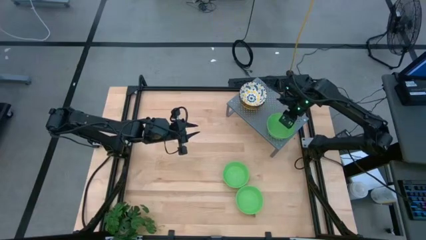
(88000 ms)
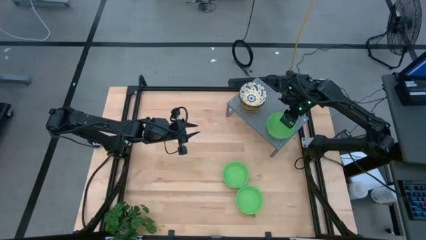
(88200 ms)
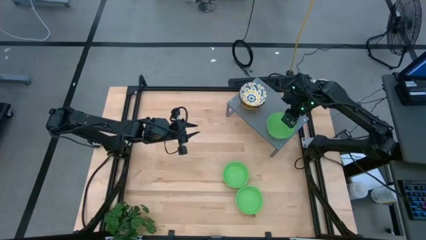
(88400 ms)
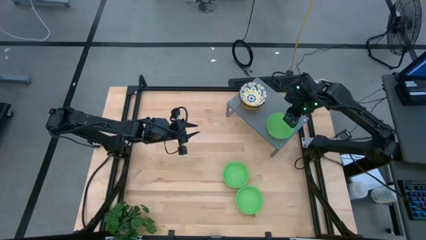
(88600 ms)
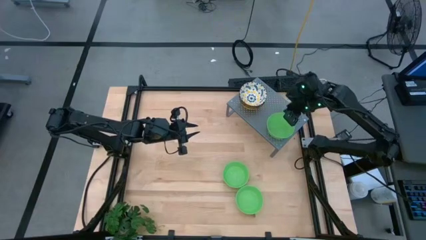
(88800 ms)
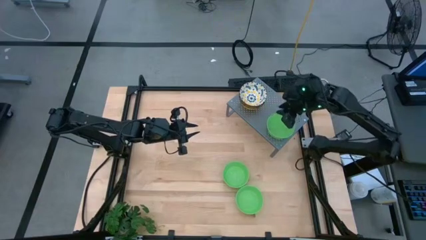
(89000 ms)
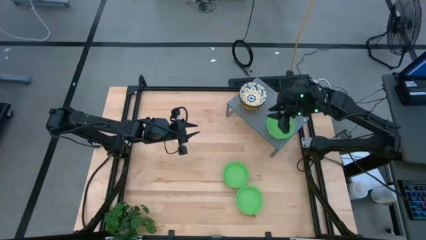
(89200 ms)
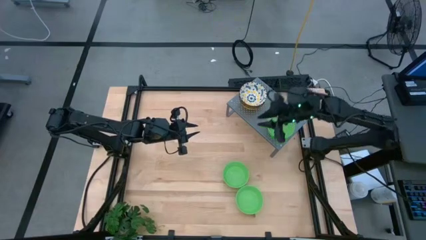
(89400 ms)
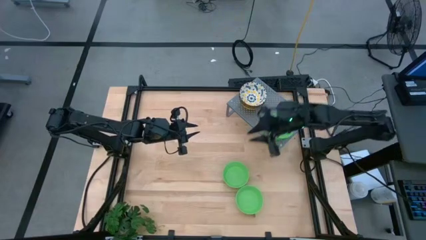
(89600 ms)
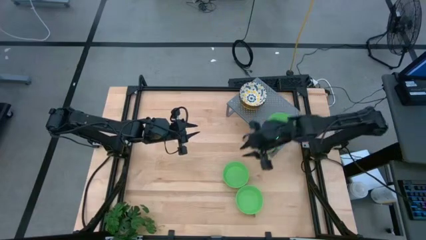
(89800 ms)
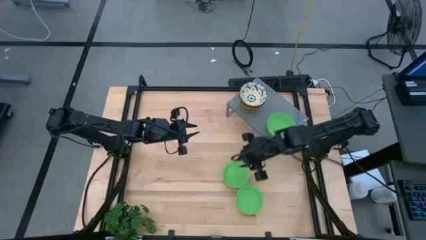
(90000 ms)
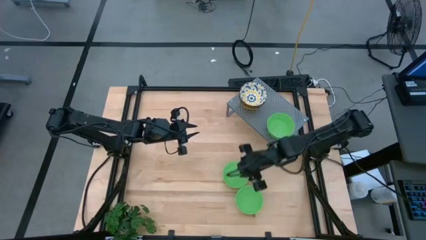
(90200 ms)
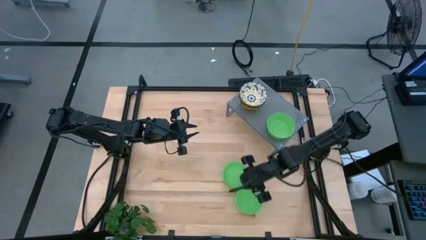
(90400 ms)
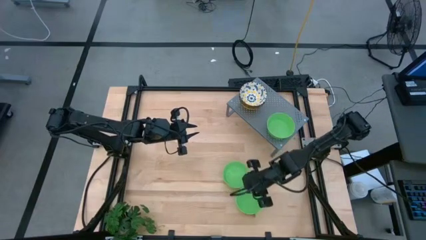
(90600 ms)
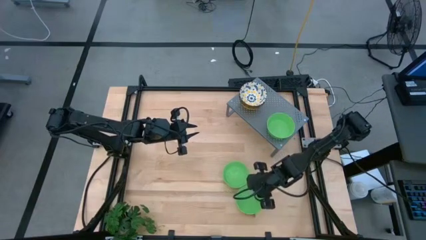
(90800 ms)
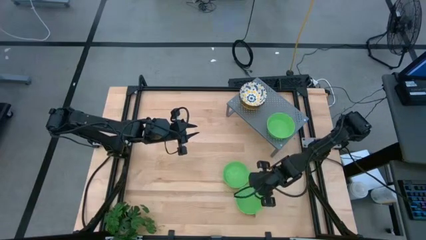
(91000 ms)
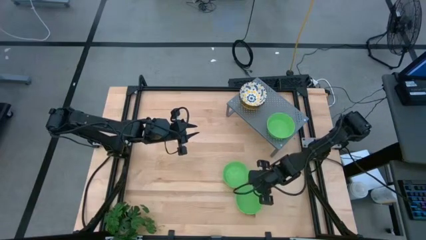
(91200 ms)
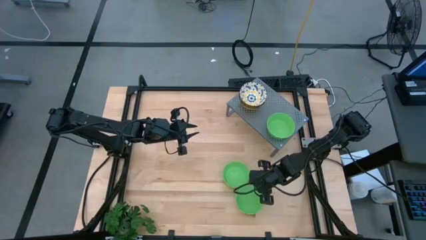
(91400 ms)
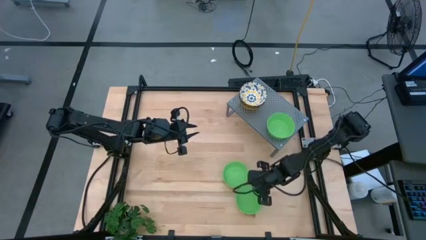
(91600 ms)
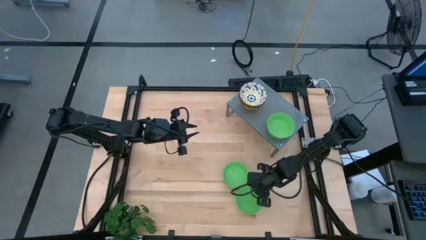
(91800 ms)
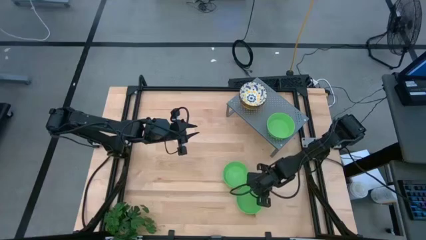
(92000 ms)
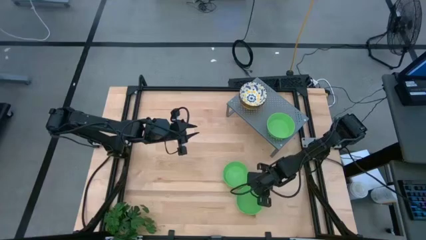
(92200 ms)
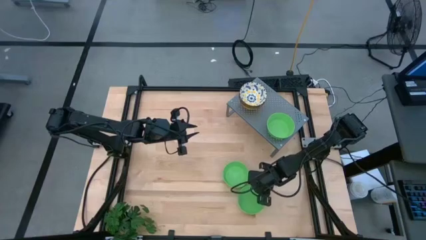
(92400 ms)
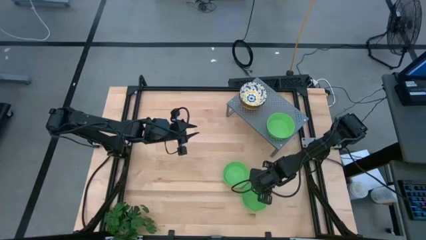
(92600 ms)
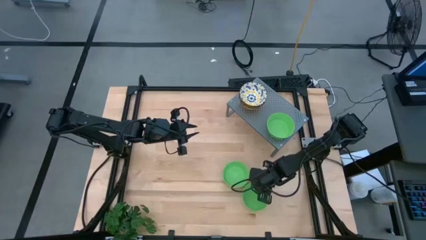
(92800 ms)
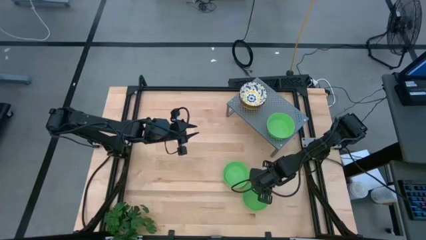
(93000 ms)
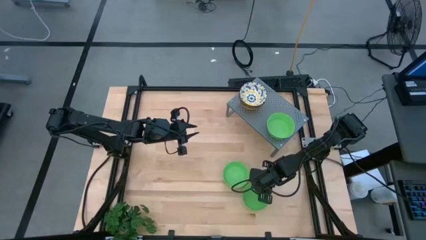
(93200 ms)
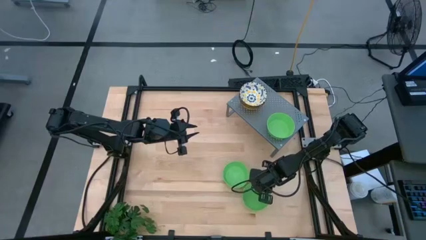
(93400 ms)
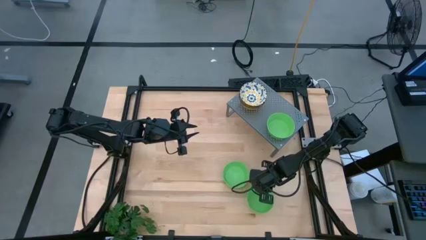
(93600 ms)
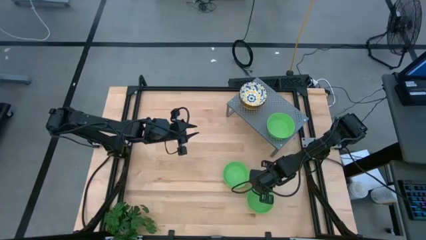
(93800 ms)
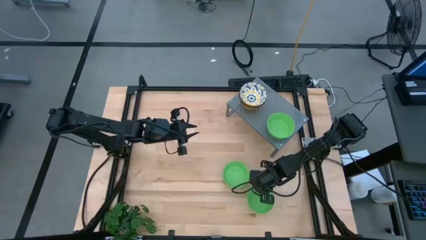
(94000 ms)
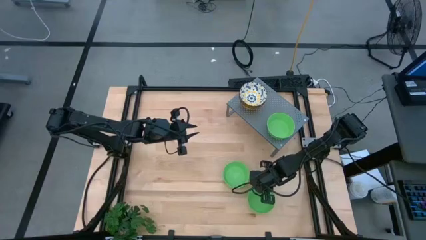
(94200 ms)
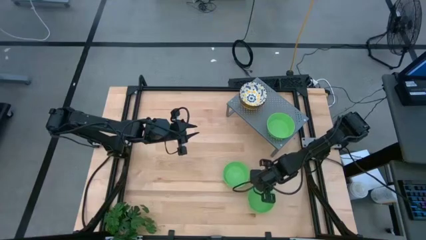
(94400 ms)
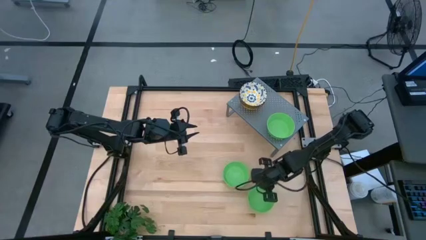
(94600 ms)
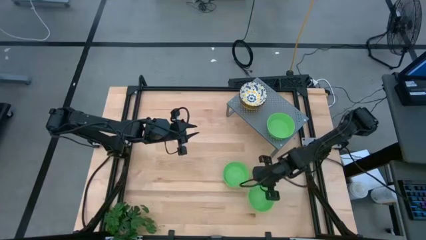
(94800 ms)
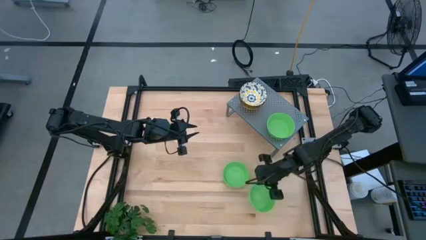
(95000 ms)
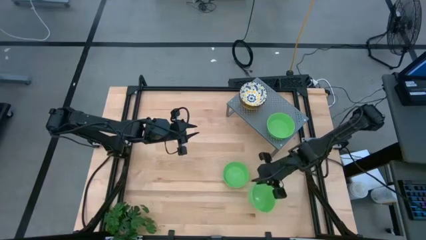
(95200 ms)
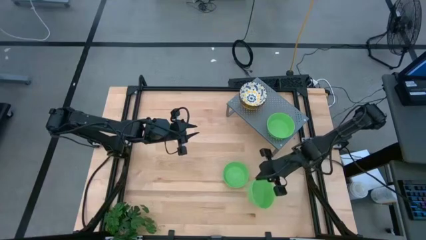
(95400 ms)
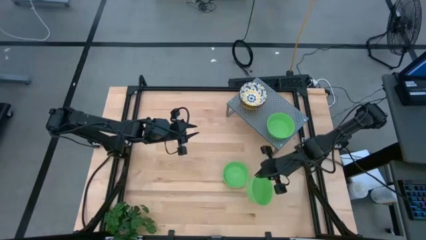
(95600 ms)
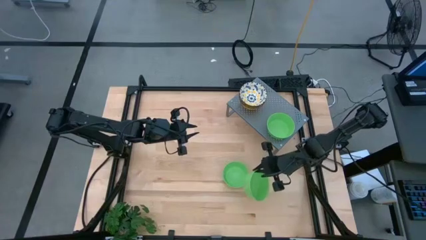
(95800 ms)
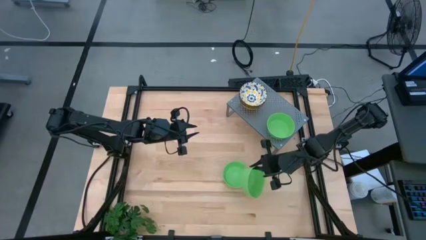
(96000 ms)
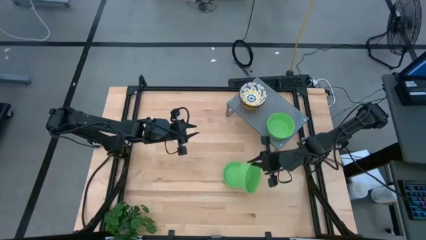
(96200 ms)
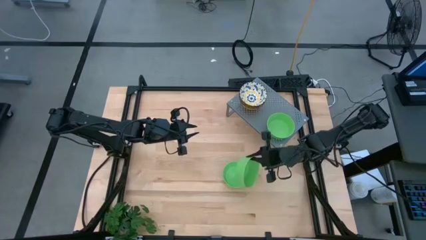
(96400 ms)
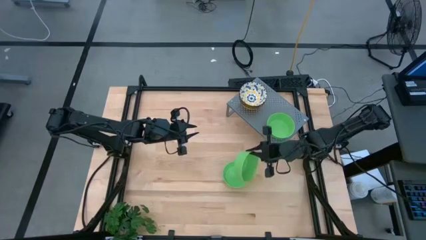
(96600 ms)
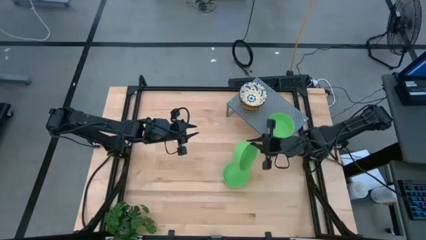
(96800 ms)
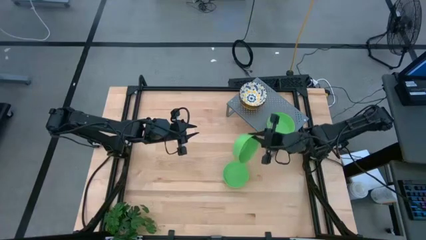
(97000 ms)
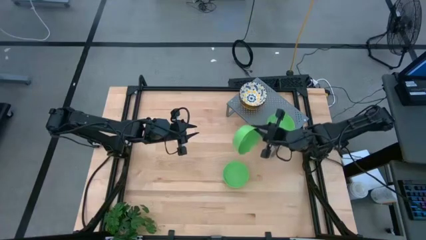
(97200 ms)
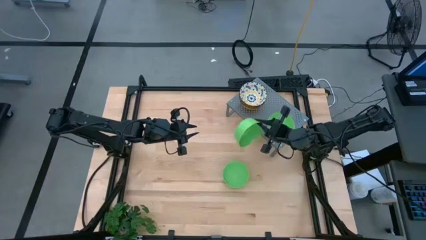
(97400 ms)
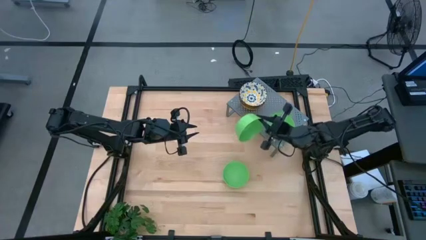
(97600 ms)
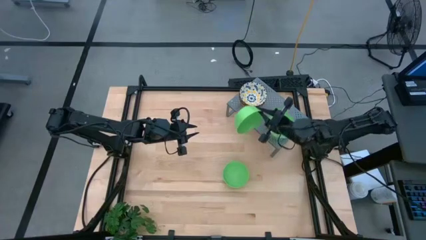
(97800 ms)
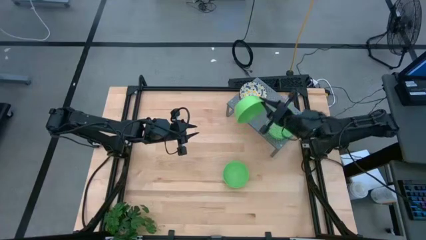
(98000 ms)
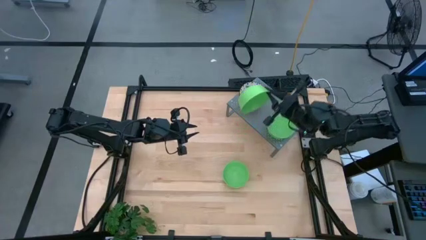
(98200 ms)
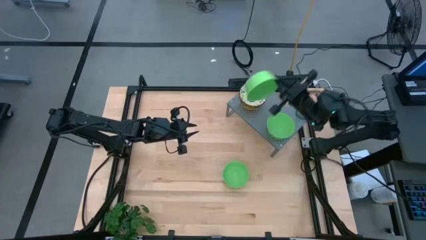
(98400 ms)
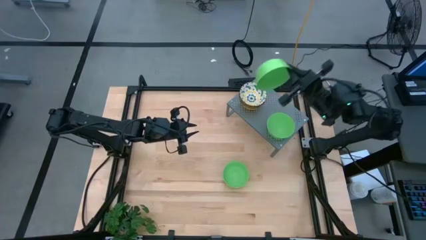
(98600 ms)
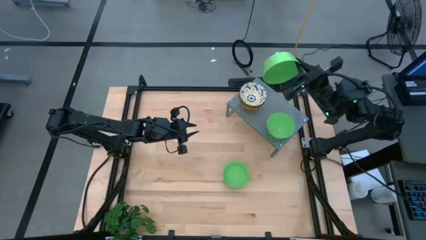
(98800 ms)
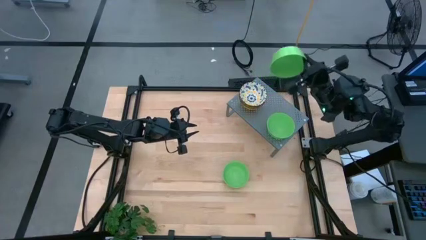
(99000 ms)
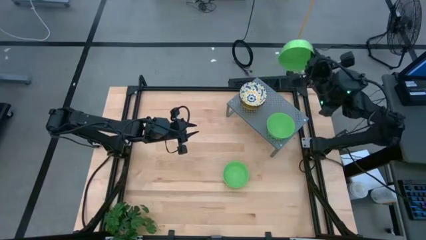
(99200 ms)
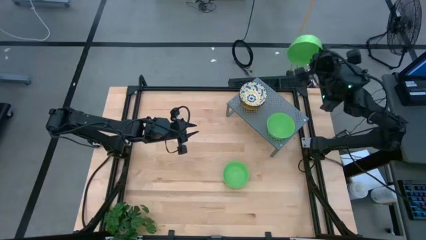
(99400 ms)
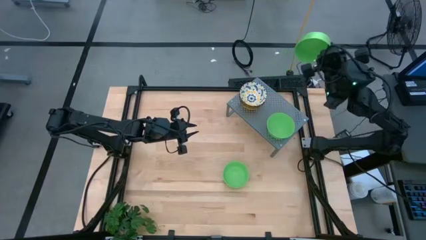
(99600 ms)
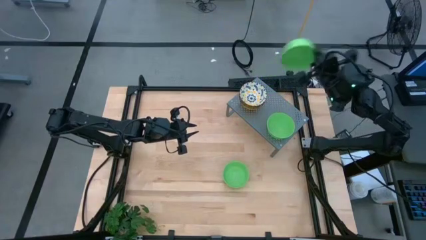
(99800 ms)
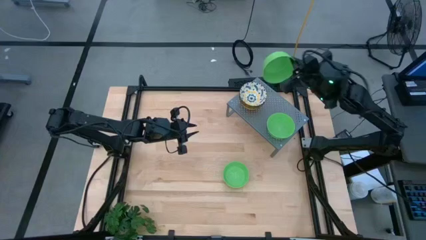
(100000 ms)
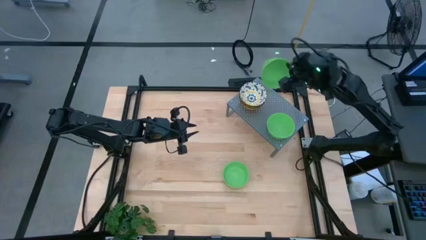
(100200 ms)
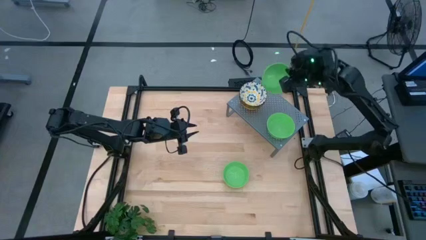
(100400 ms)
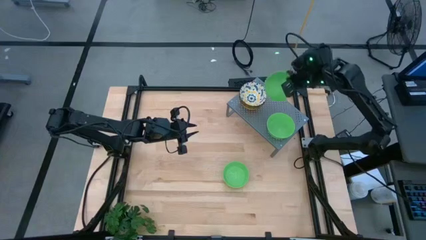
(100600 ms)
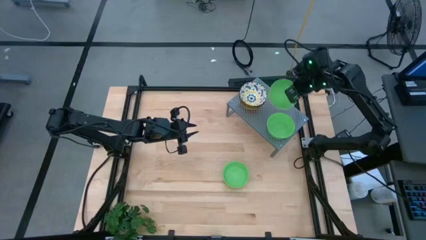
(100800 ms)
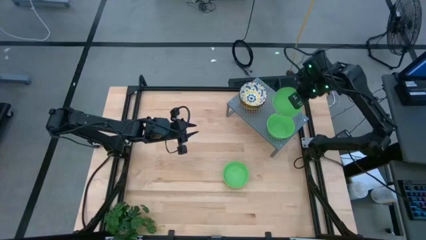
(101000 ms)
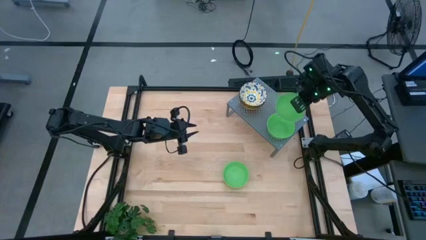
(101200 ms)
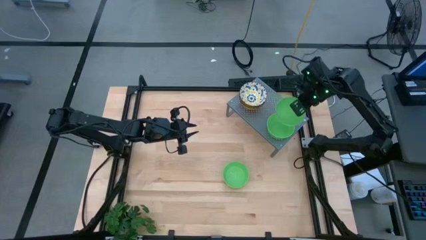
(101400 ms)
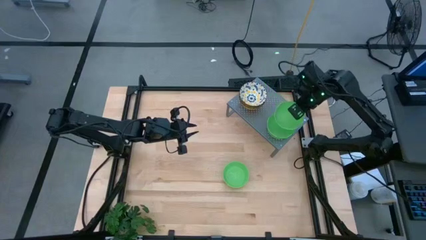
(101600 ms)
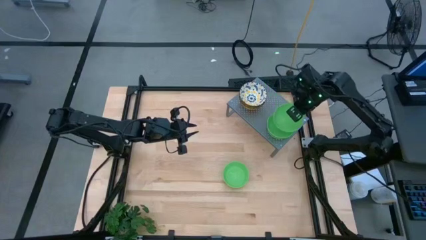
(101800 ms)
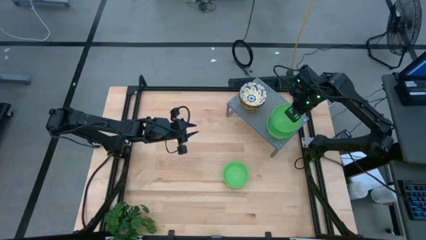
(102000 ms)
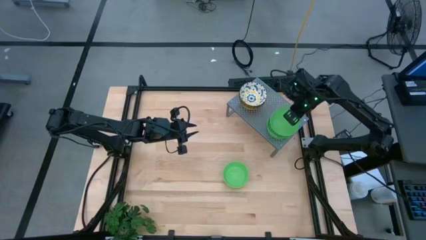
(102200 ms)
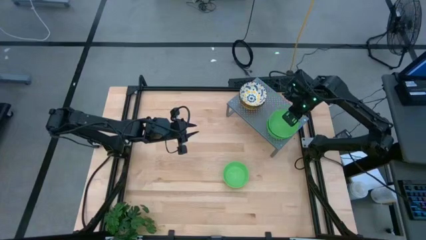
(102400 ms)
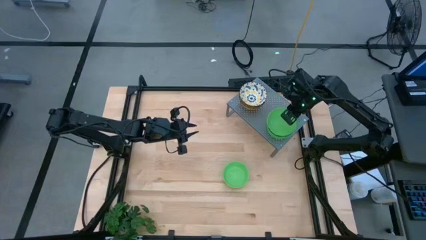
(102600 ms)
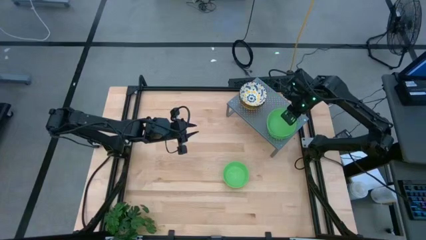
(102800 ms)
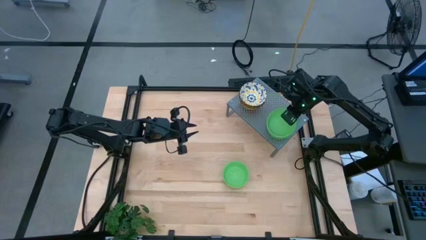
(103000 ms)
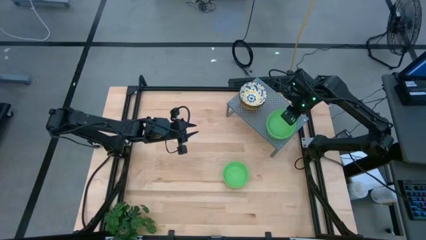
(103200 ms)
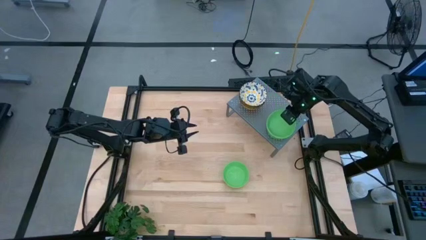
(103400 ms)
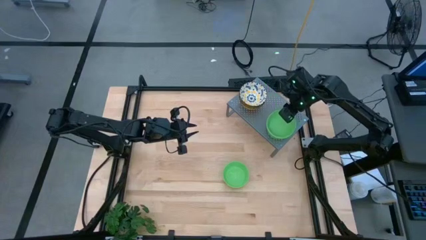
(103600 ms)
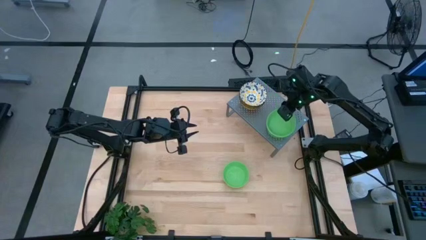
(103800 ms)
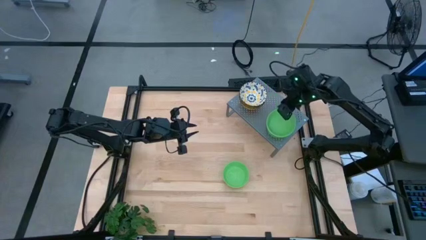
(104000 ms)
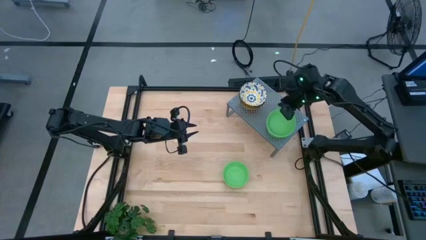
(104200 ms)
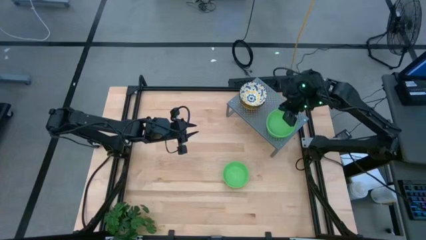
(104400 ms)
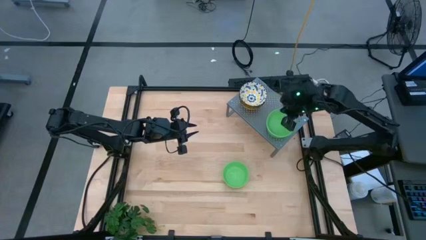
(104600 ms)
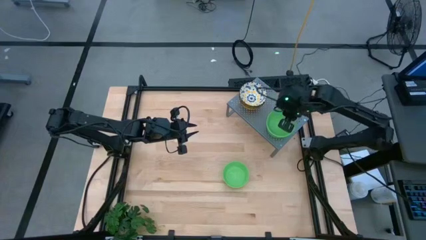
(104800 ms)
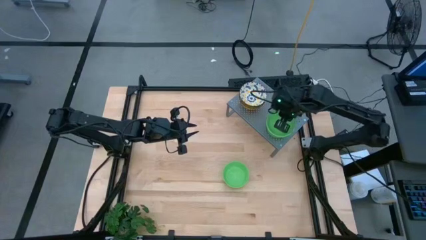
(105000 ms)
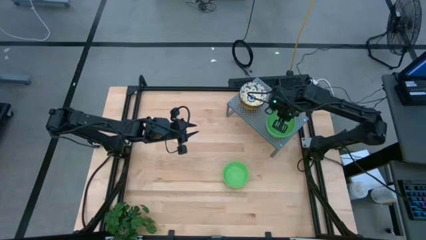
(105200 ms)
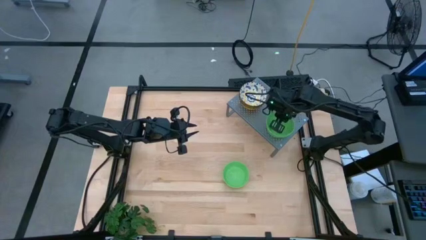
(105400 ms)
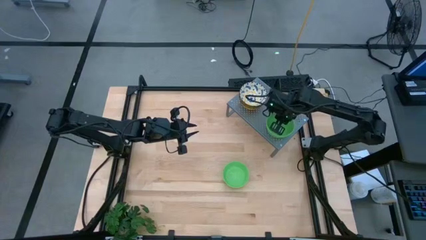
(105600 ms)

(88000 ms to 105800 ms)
Task: Pick & Place Mini bowls
Stack the bottom green bowl on the green bowl on the shelf
